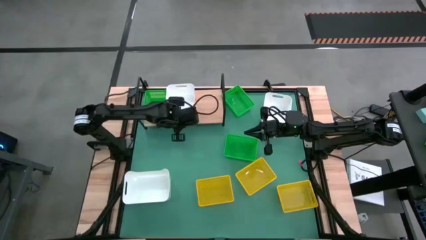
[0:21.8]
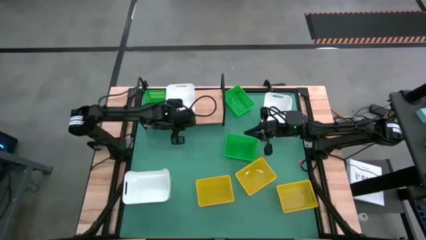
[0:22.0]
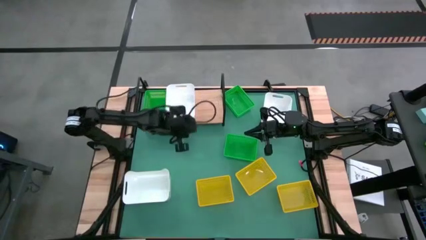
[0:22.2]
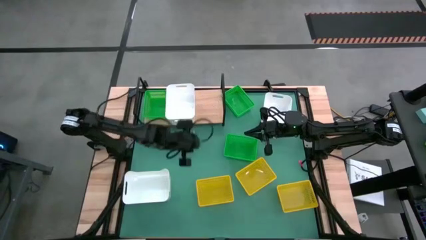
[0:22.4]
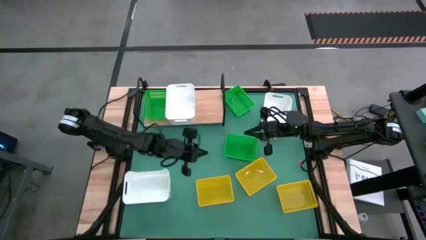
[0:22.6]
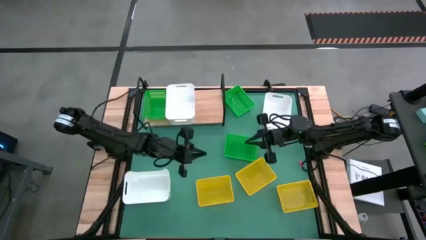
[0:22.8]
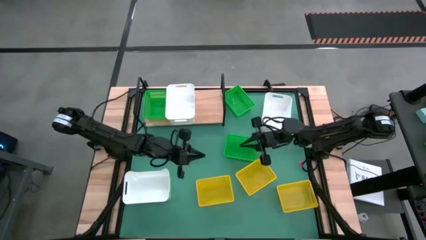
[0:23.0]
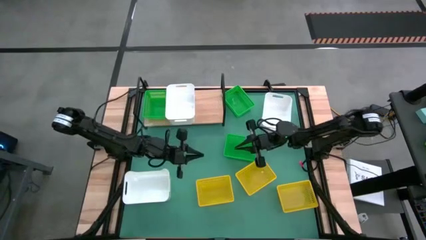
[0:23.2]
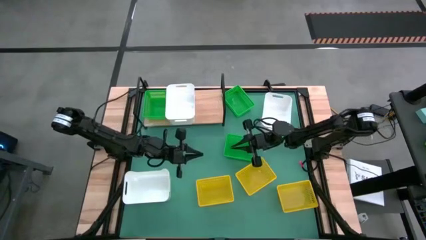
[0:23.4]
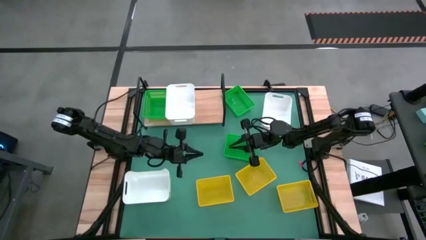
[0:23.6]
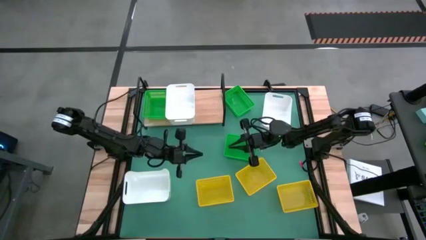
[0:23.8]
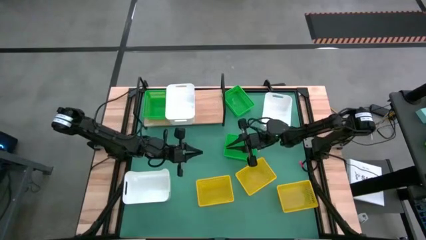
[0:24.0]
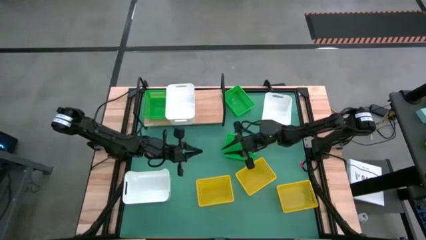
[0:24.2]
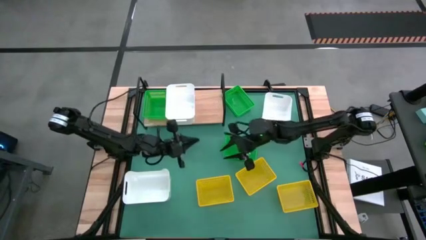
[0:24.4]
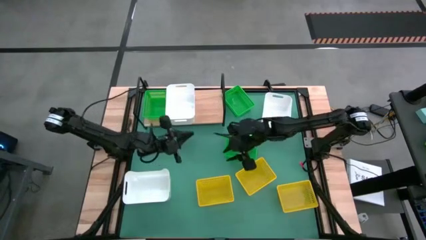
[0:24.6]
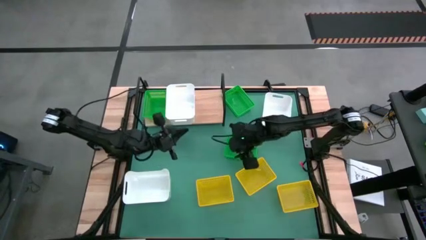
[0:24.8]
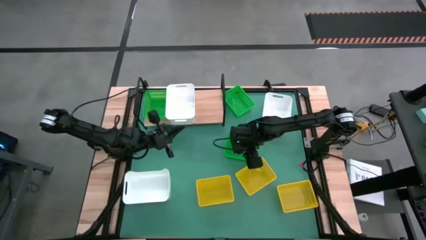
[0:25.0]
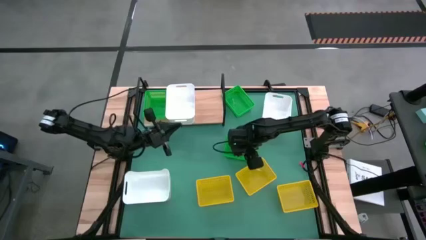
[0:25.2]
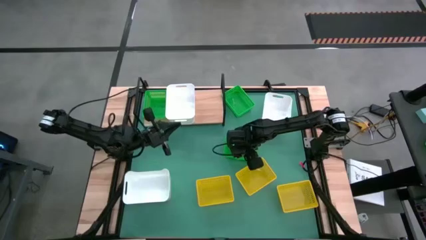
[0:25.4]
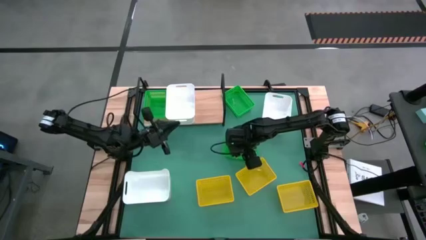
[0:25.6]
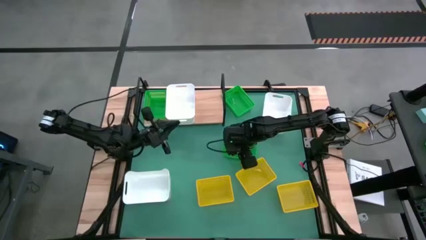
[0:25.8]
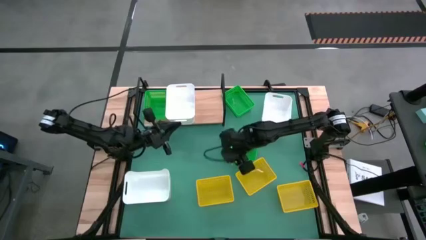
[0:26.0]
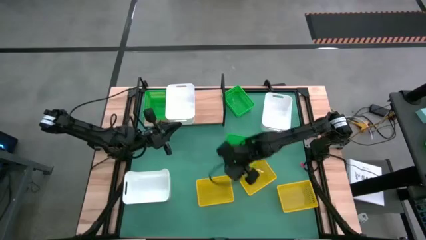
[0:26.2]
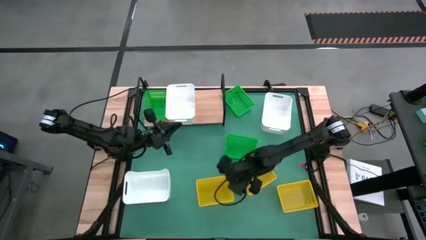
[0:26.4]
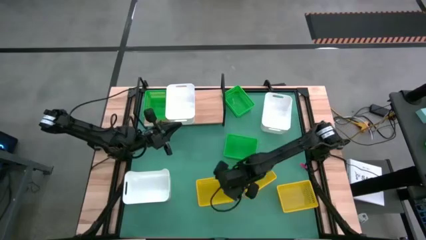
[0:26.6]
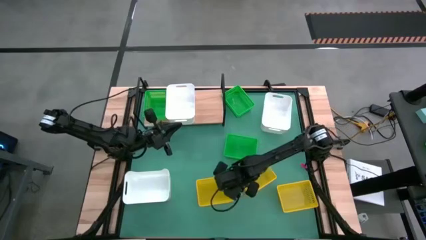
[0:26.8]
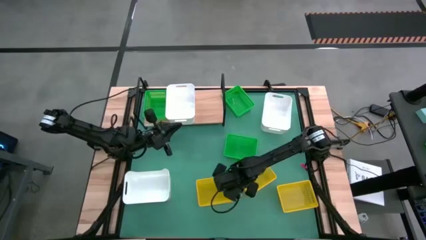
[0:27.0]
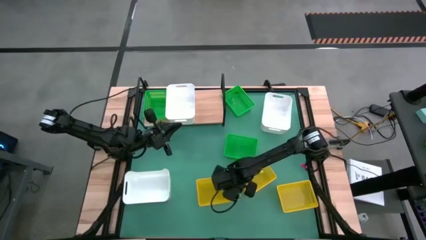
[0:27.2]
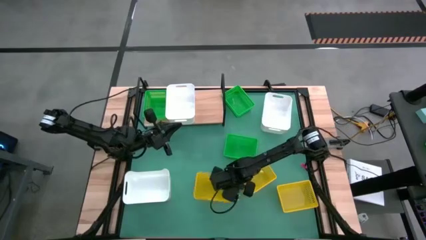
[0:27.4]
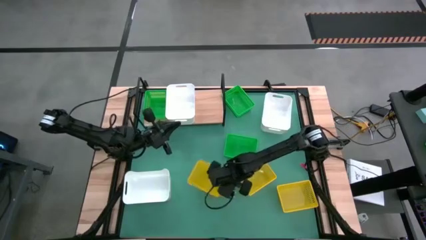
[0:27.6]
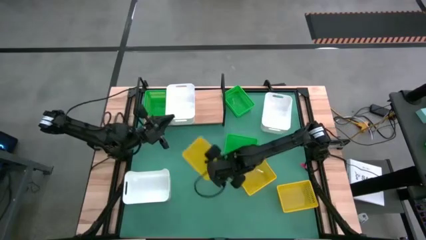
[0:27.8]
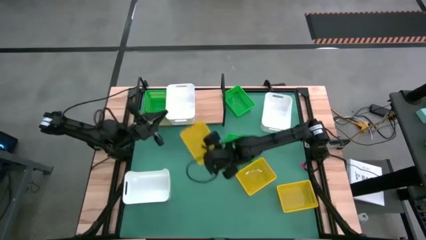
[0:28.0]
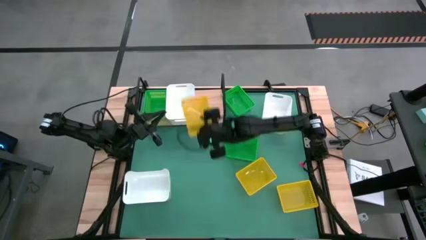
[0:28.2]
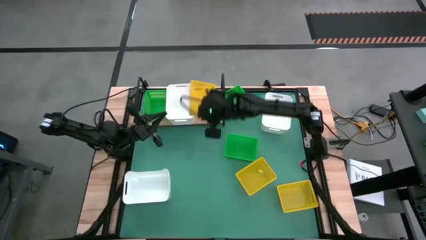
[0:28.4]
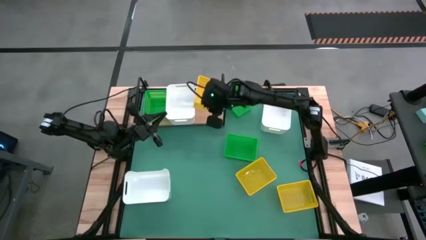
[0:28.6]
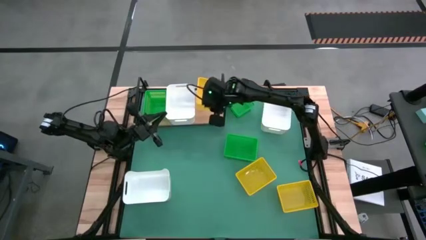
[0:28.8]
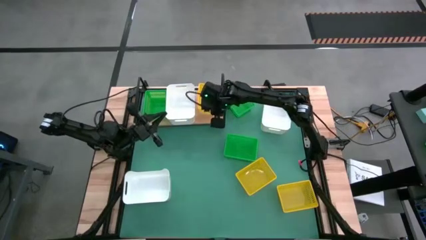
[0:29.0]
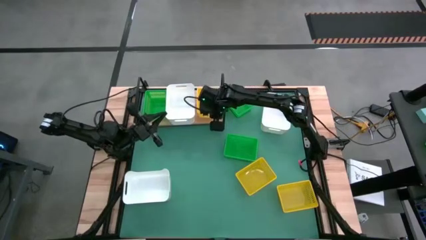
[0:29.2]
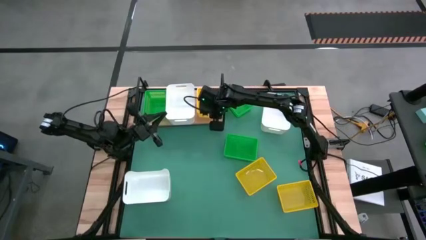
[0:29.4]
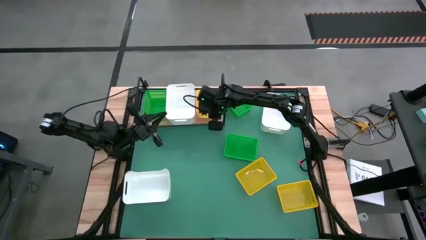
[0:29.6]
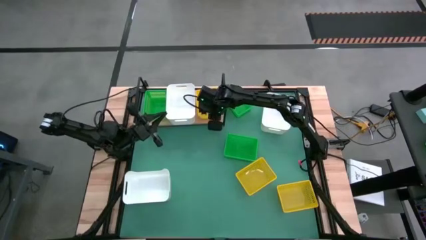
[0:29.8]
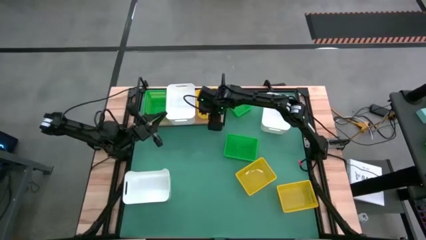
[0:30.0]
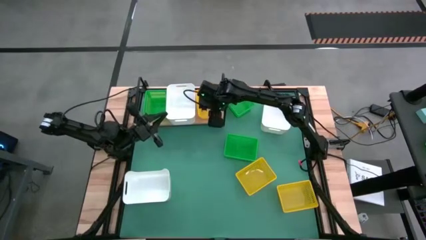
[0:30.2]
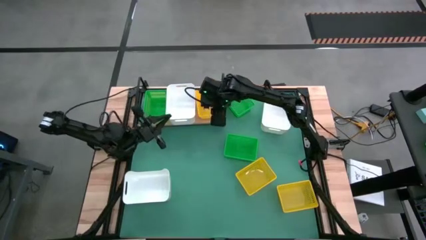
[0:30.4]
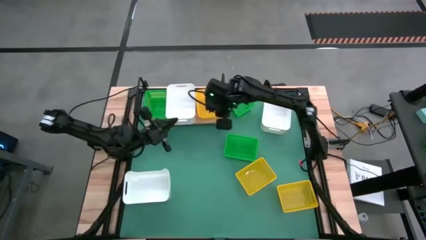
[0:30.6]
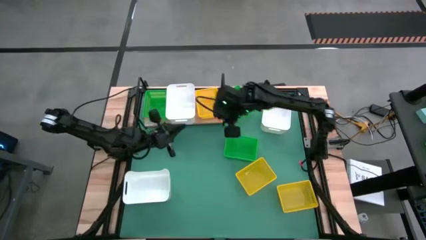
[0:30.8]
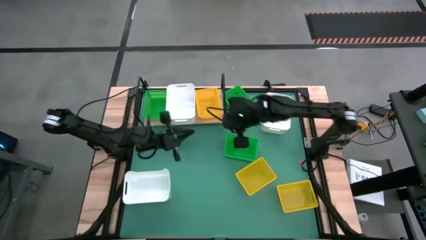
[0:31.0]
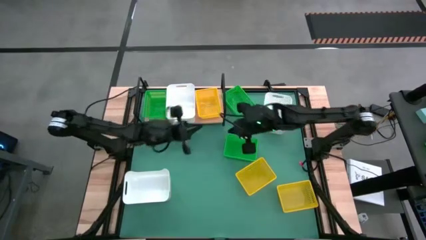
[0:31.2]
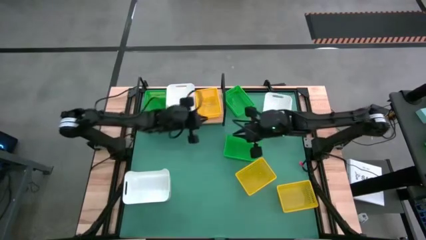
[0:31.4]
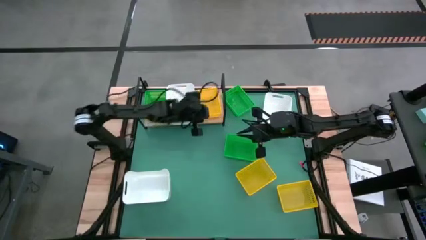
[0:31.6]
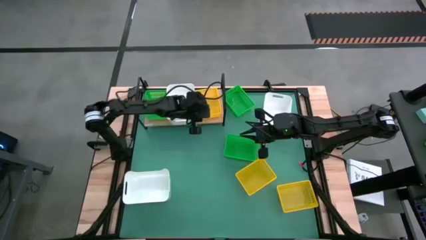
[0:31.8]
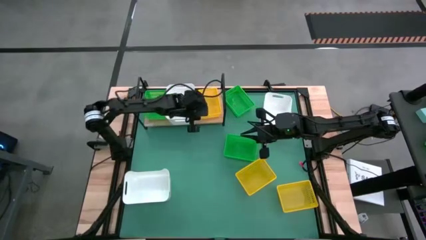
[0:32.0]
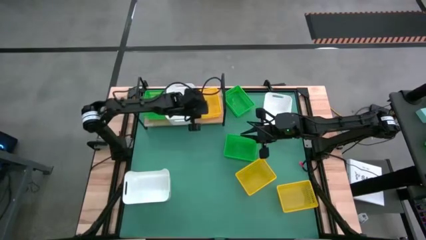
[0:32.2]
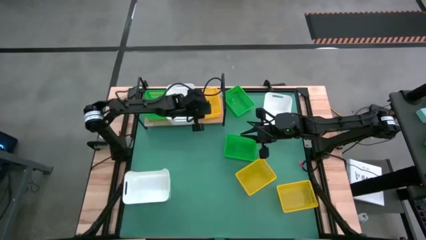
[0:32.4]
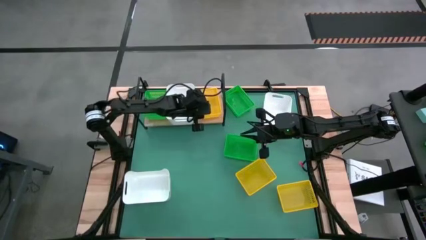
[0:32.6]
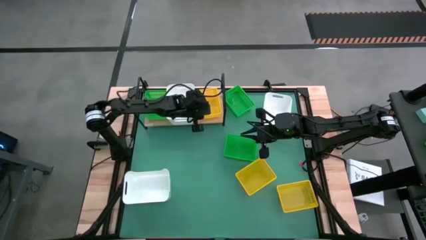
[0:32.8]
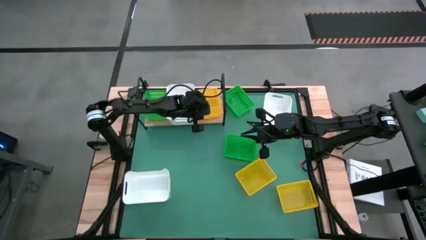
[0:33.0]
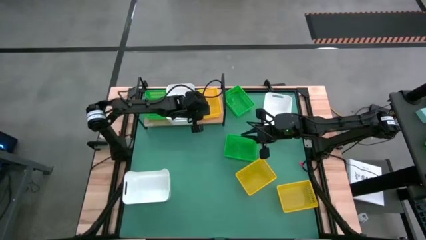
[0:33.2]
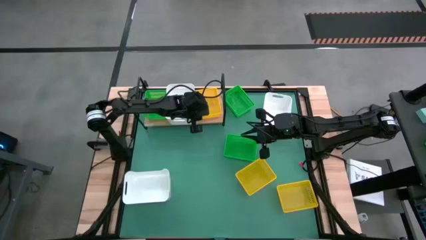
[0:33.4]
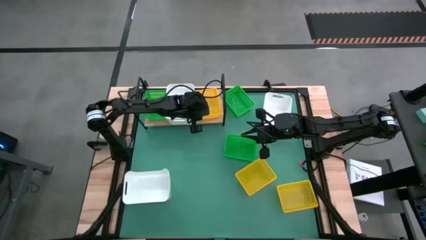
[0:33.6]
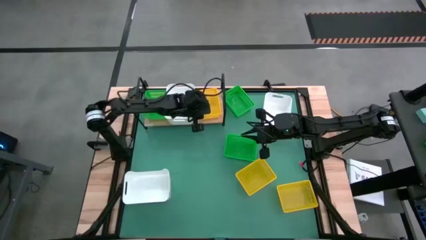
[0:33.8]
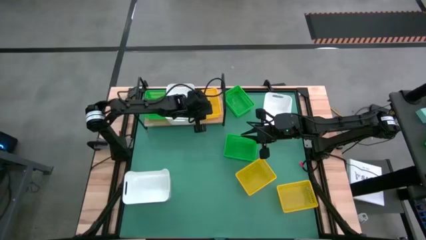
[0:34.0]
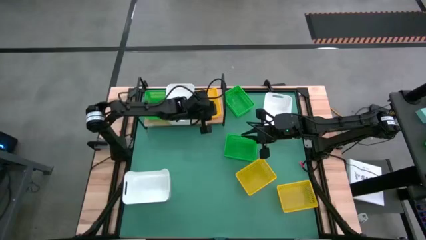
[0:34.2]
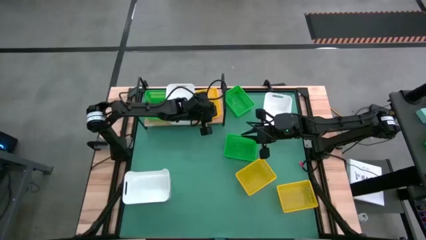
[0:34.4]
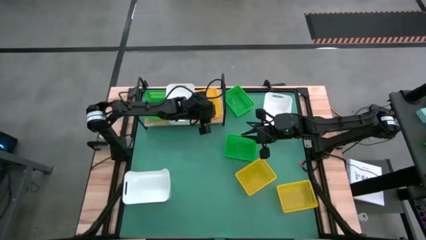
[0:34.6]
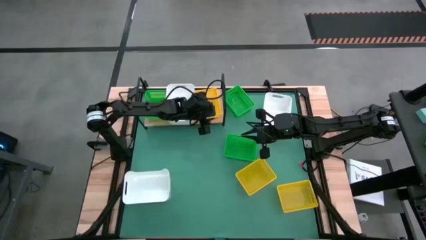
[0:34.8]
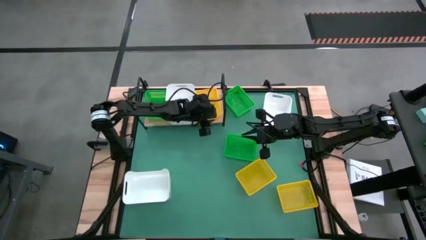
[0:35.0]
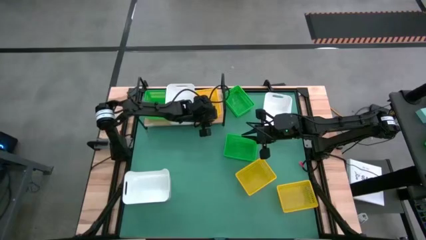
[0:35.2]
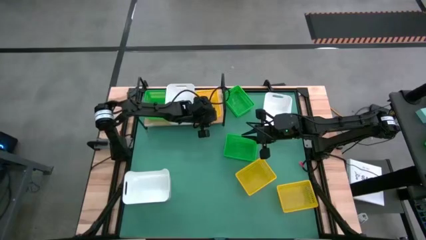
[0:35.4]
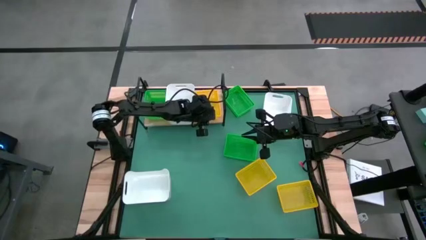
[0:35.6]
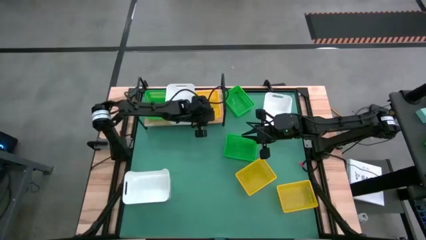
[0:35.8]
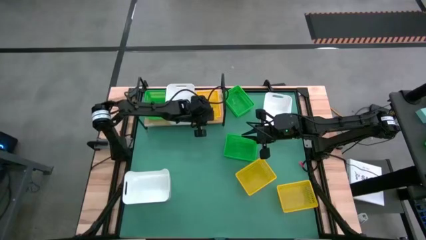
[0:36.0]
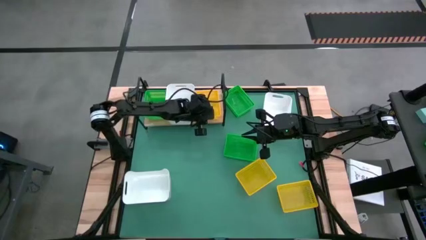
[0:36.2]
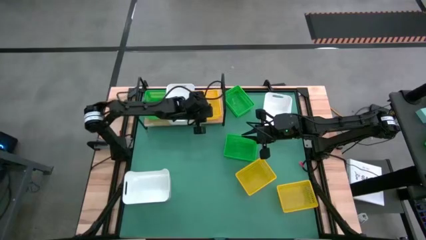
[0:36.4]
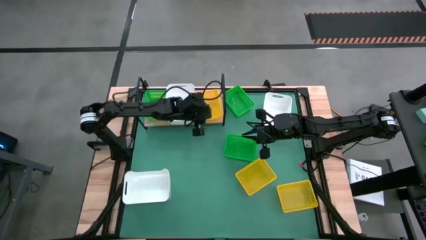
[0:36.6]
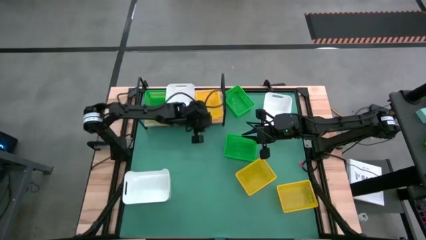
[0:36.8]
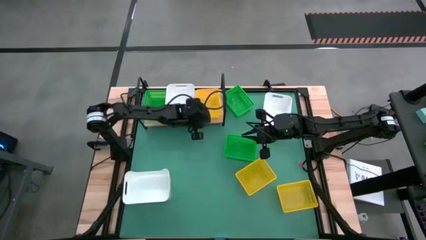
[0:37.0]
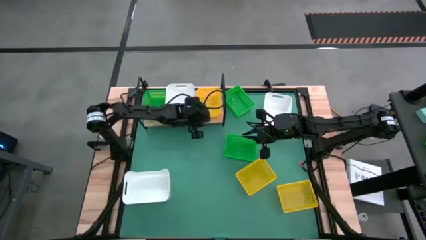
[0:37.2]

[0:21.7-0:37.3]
Task: Stack baskets on shelf by color
Put the left yellow bin on the shelf
